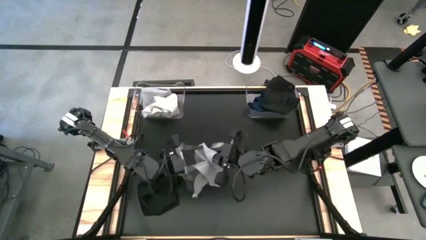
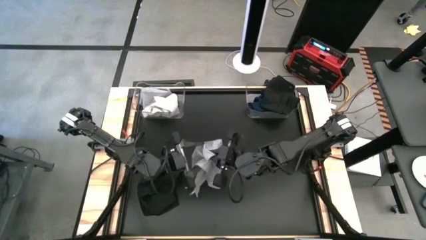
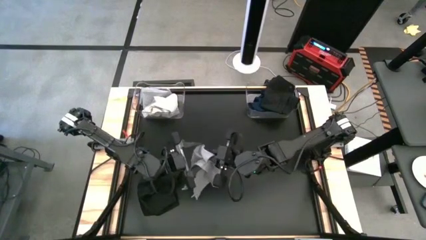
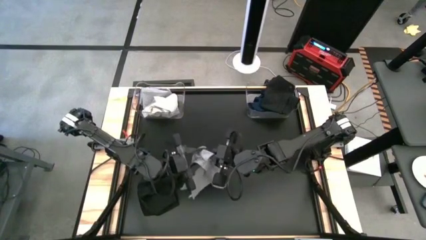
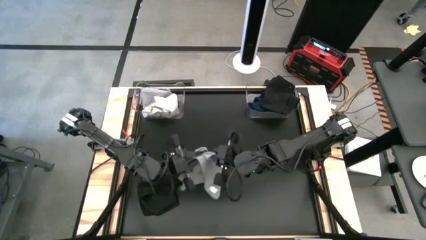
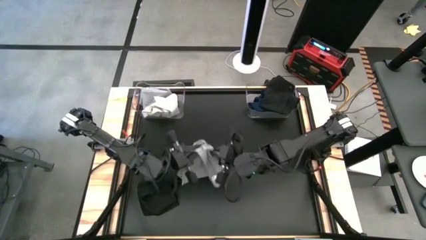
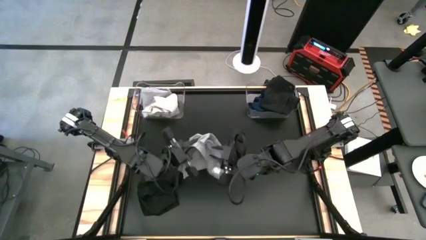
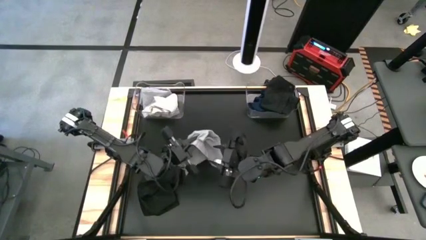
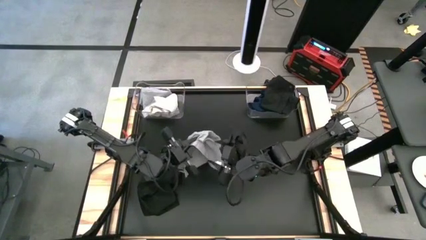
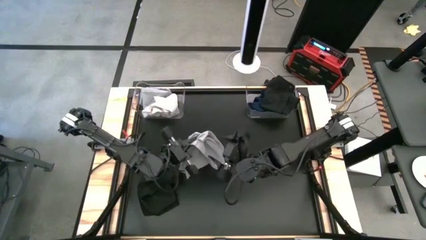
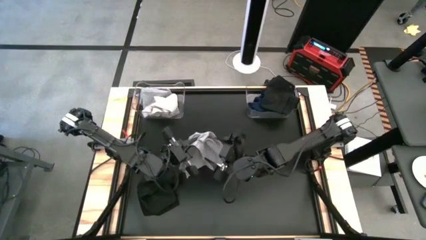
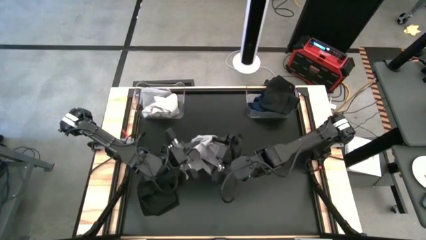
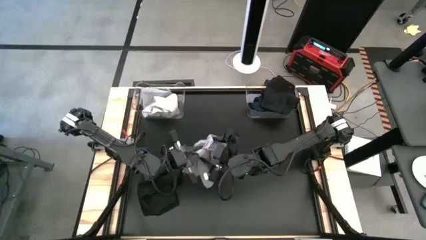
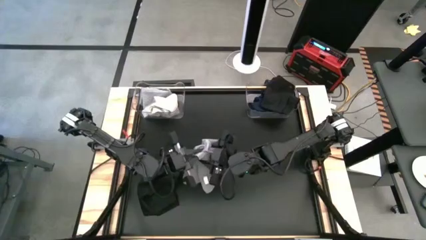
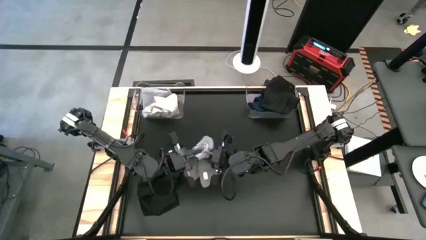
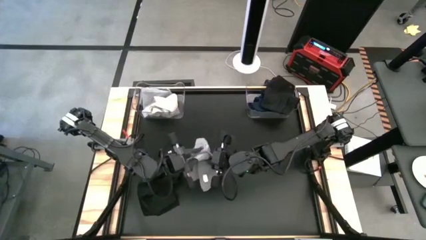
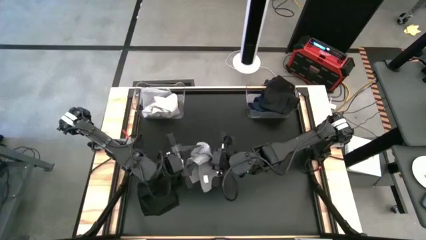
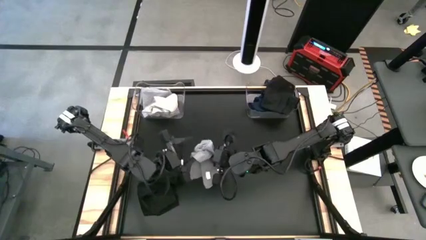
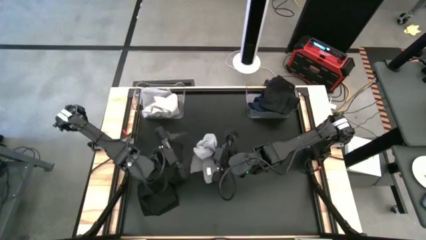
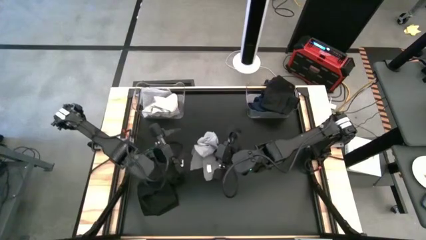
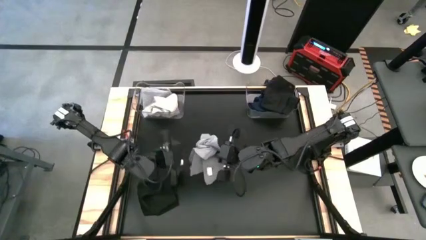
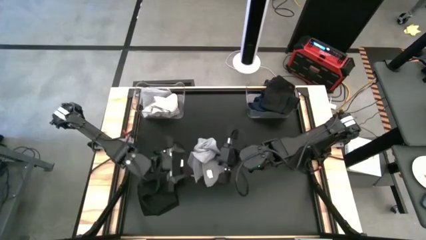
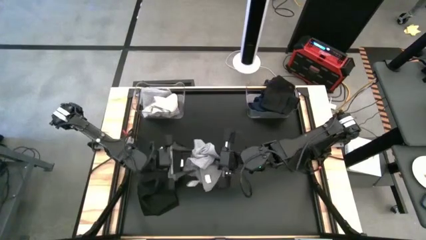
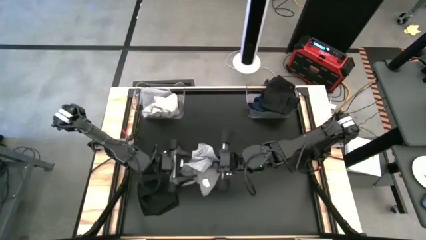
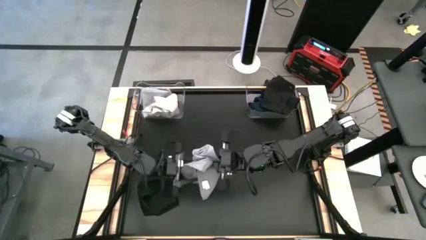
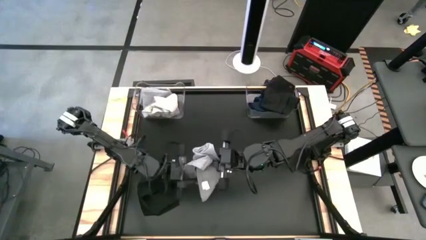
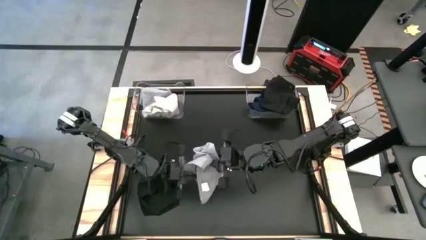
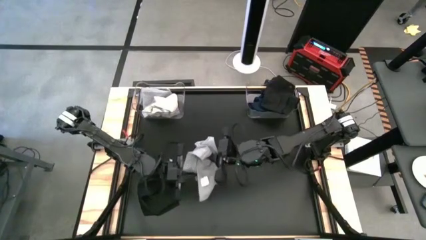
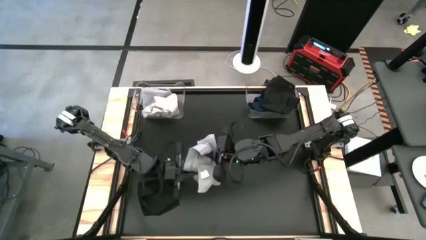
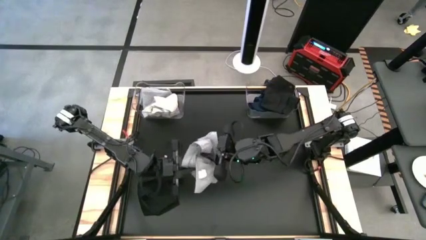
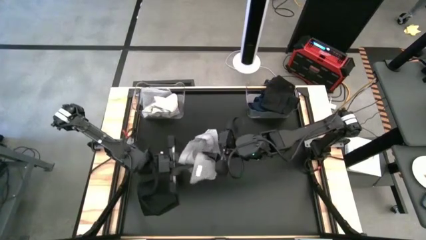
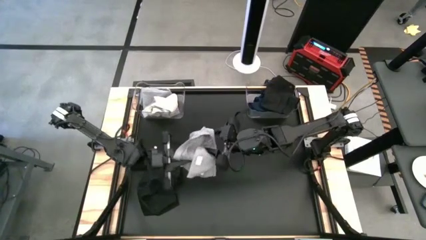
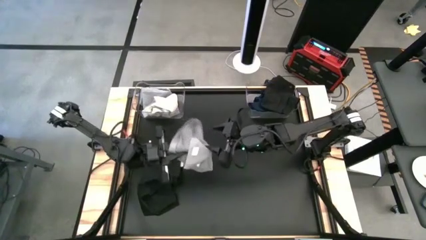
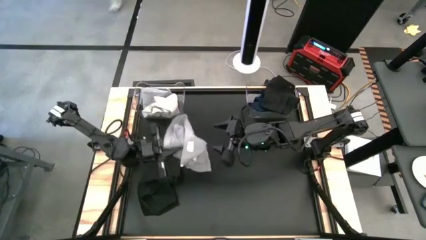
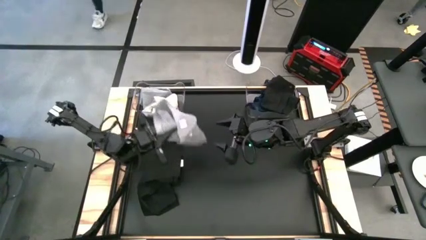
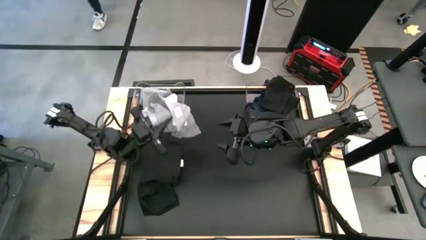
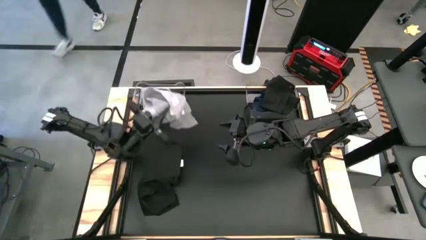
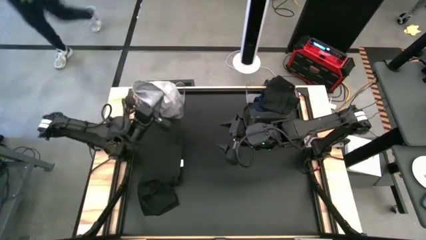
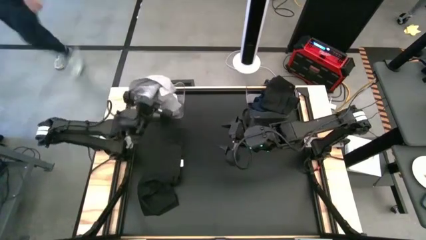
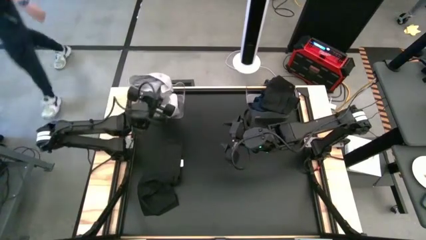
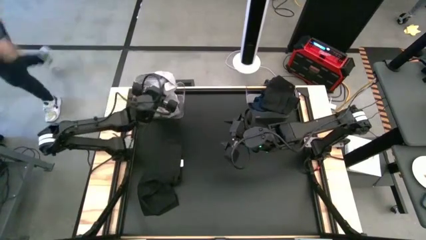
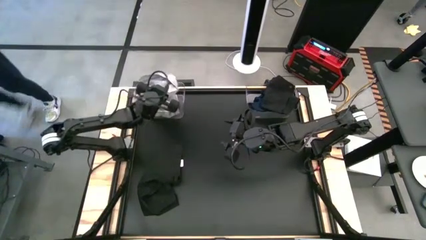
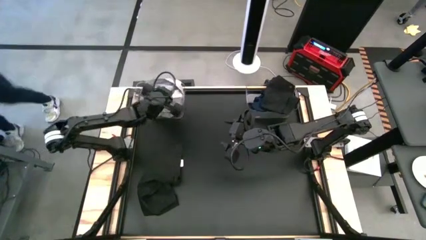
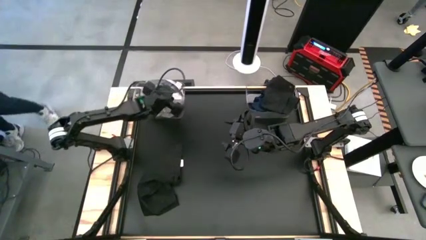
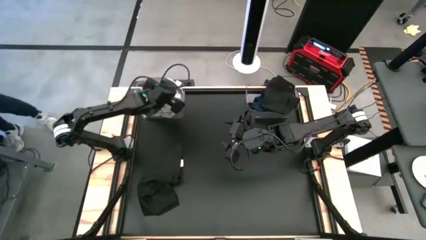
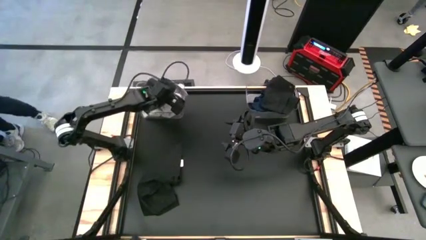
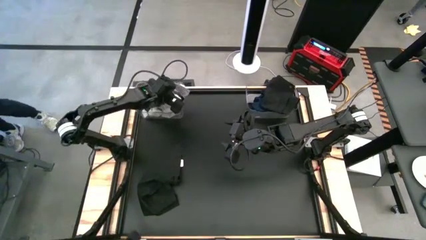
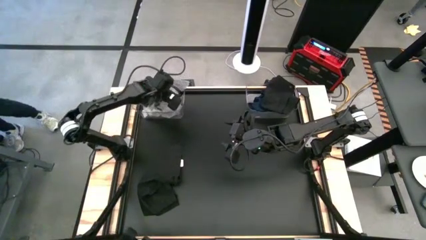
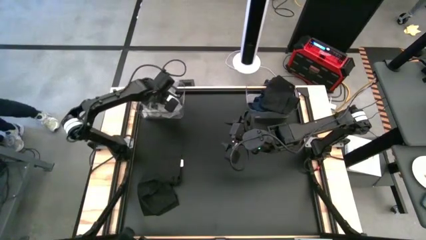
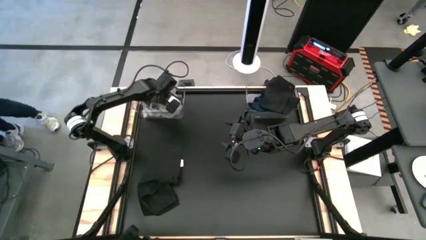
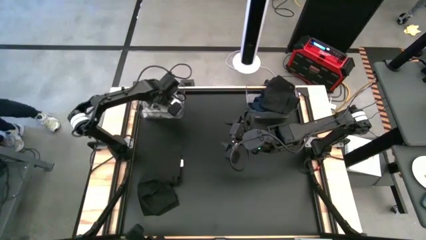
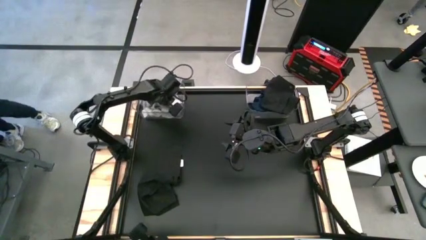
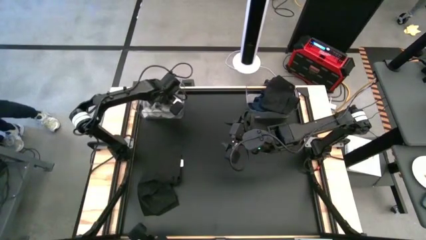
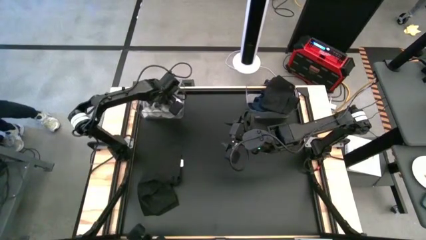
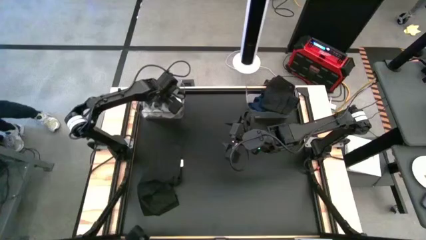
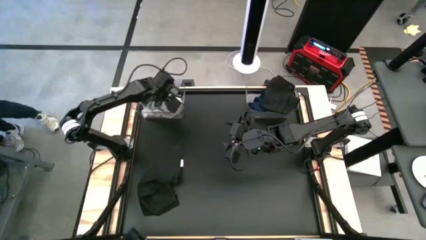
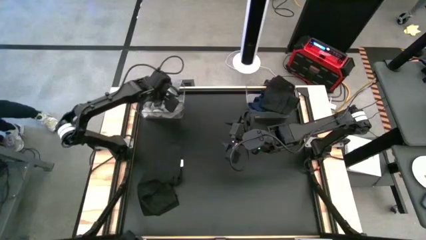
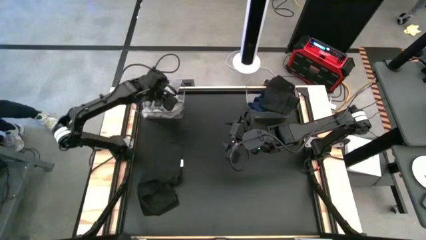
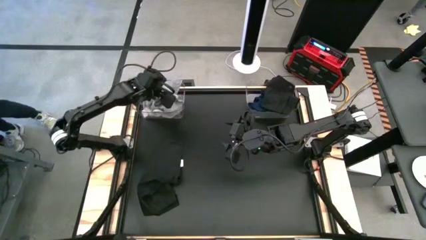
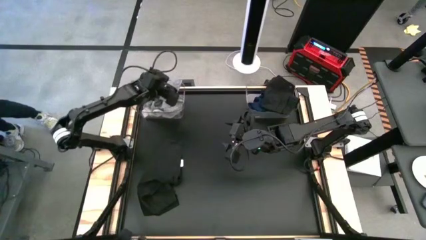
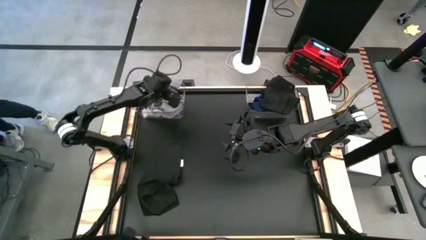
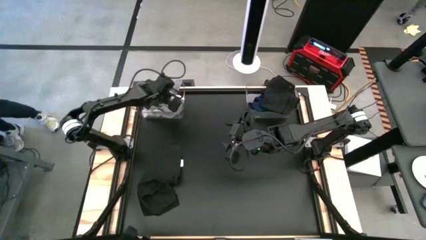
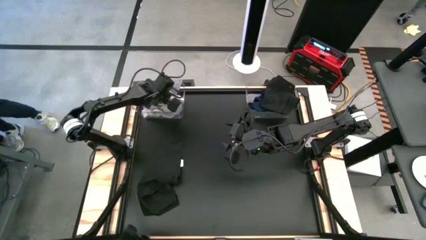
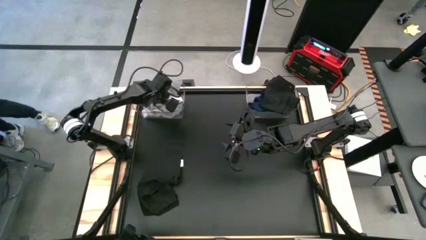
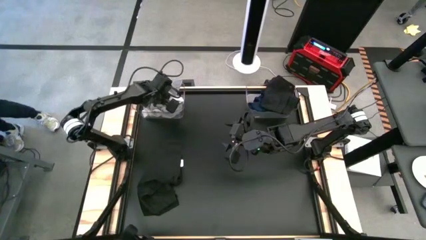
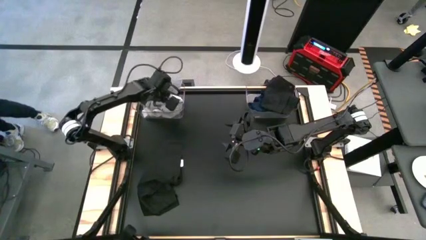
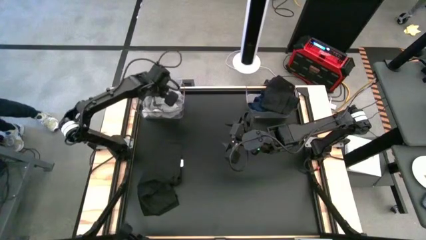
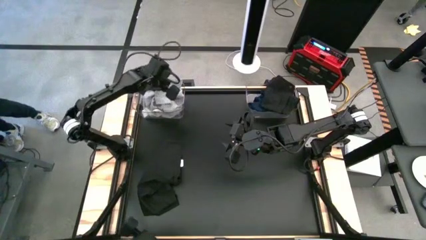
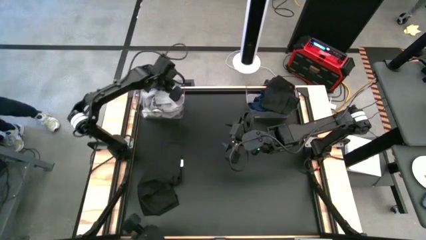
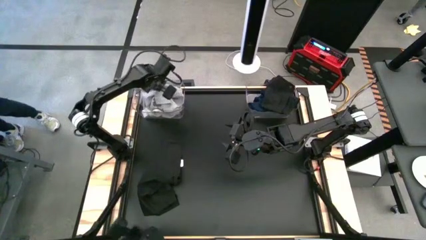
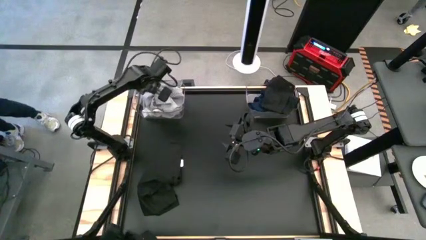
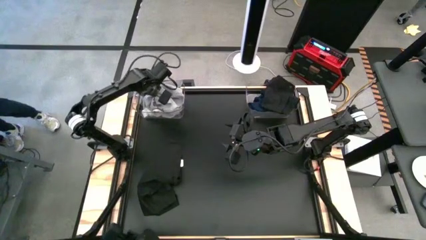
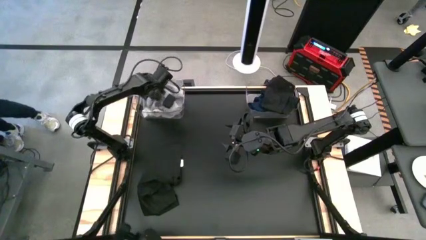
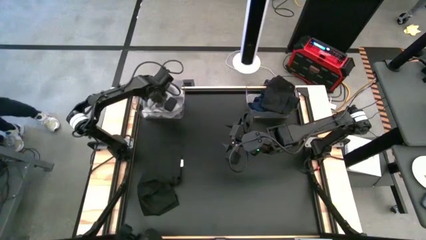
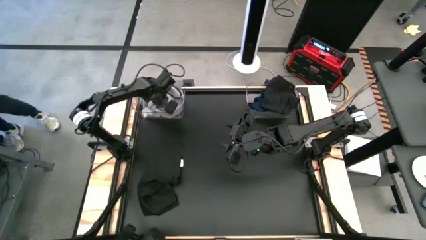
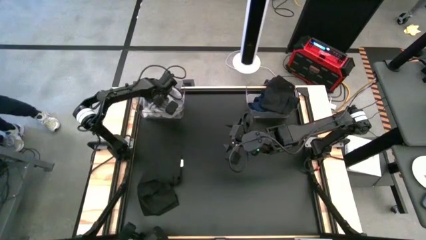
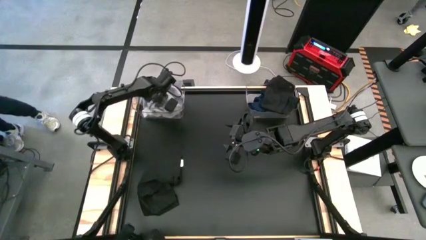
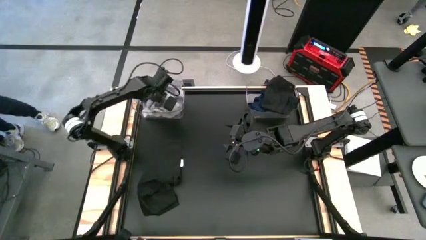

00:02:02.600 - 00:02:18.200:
Task: Sort towels by color in basket
Put the gray towel into the left transparent bin
